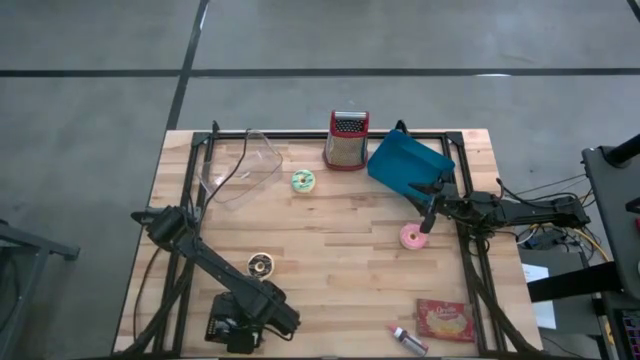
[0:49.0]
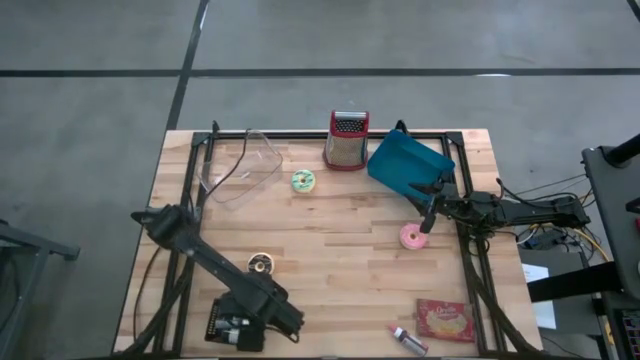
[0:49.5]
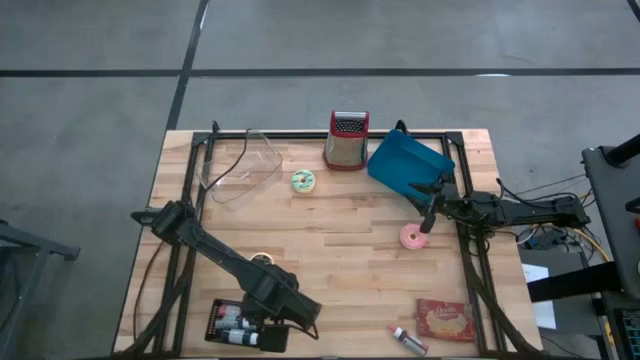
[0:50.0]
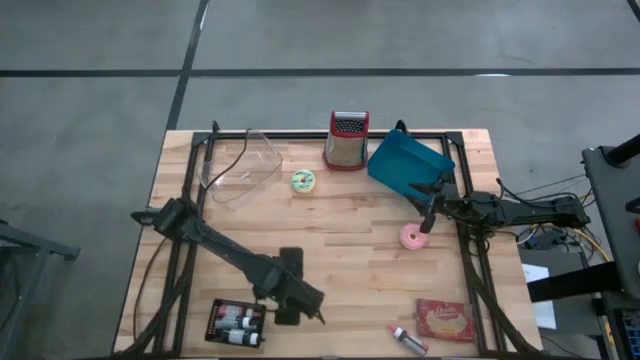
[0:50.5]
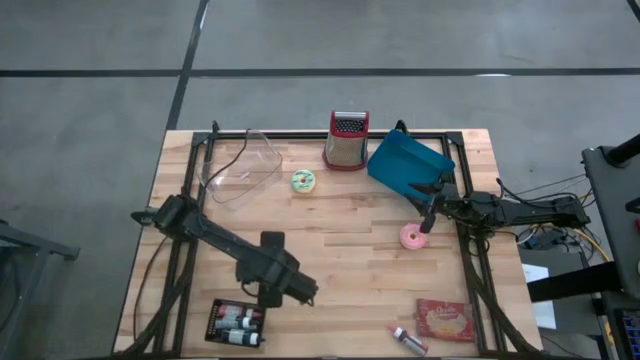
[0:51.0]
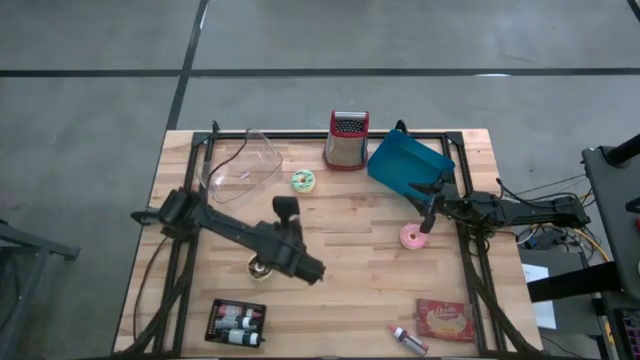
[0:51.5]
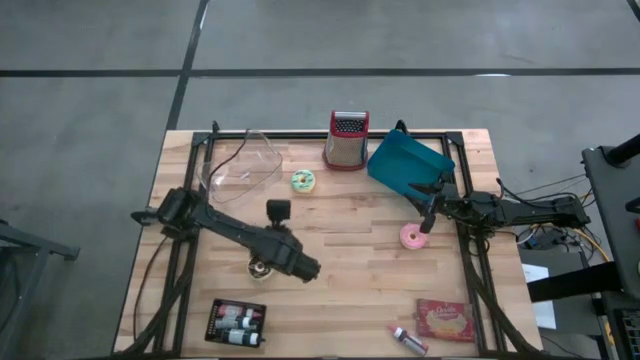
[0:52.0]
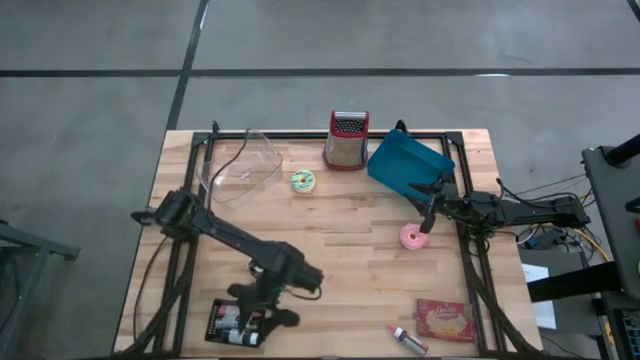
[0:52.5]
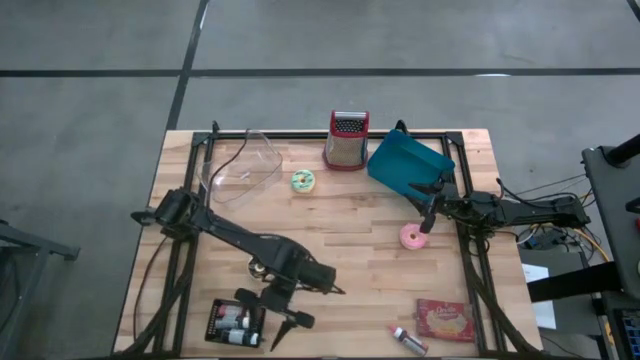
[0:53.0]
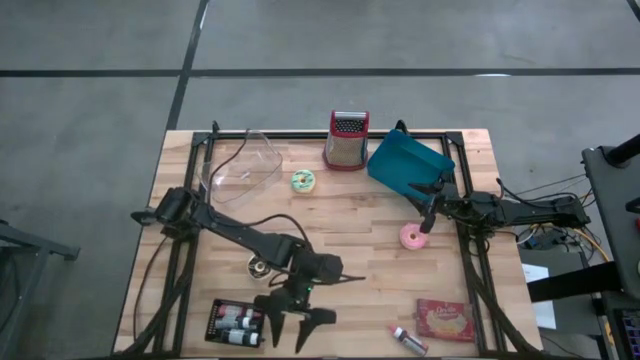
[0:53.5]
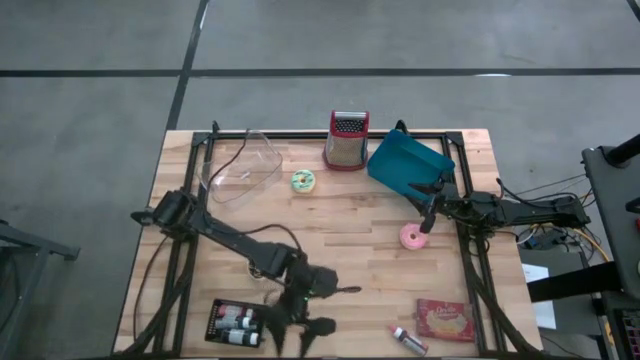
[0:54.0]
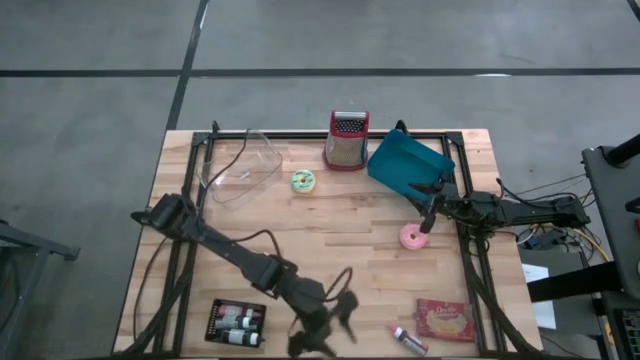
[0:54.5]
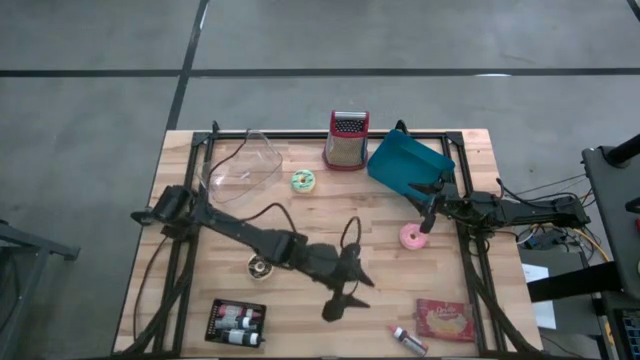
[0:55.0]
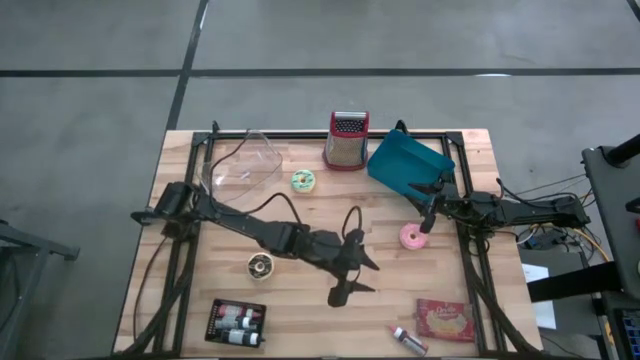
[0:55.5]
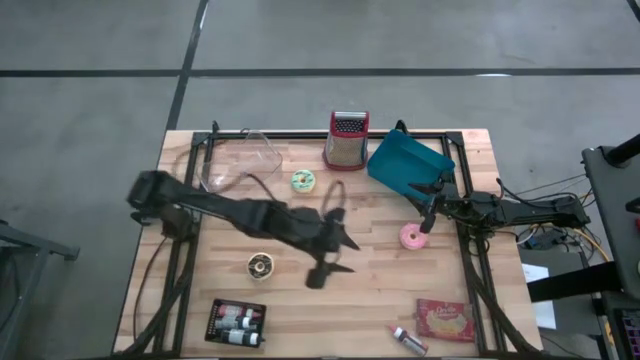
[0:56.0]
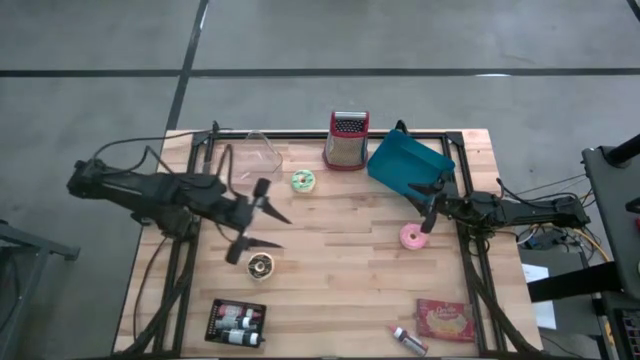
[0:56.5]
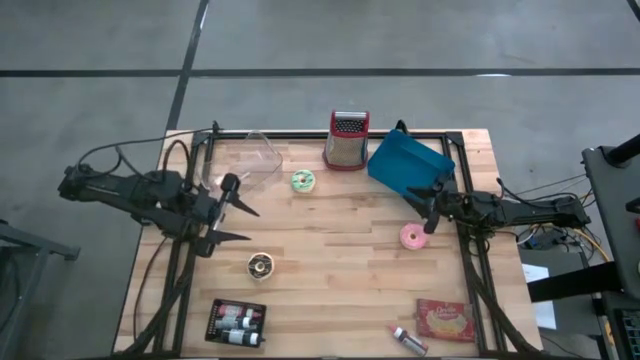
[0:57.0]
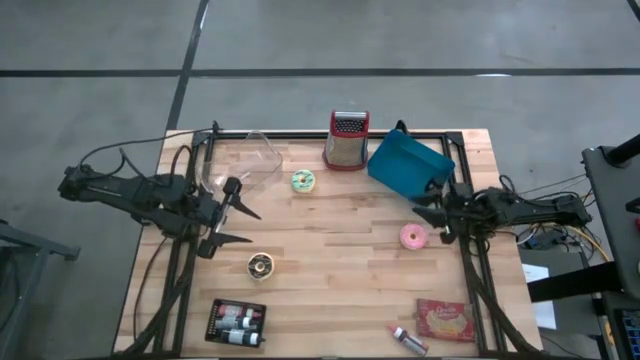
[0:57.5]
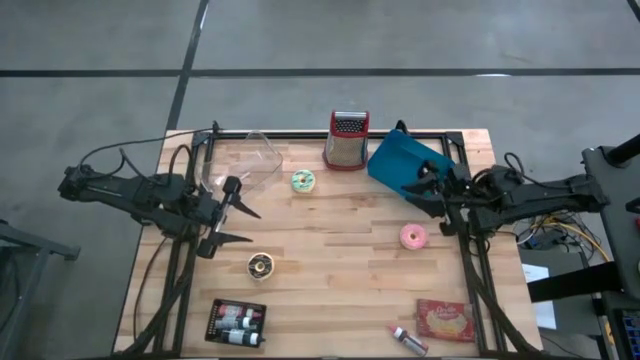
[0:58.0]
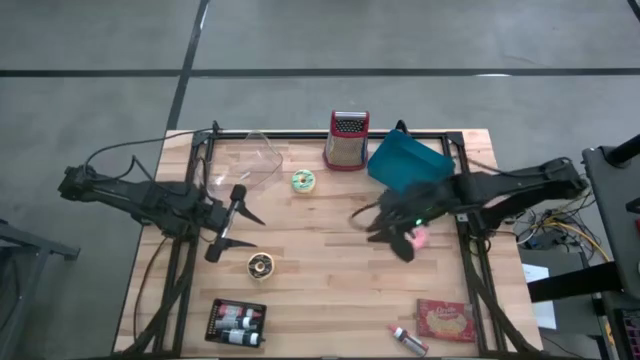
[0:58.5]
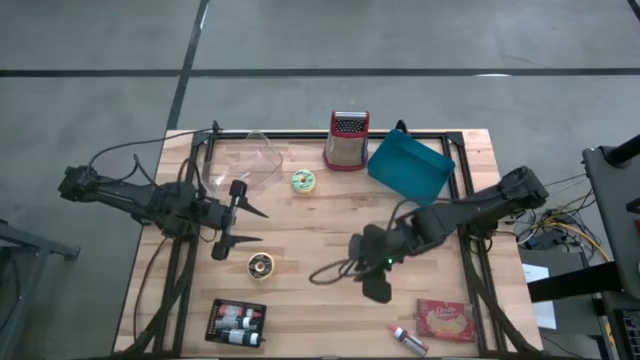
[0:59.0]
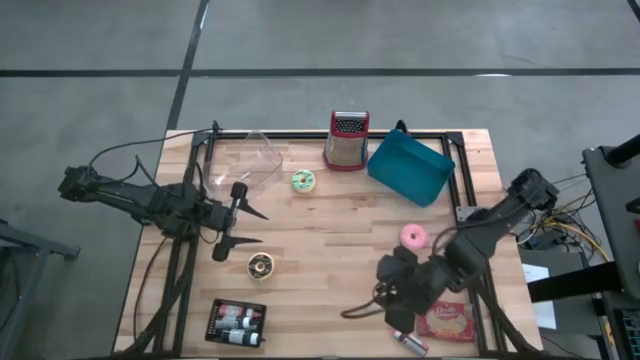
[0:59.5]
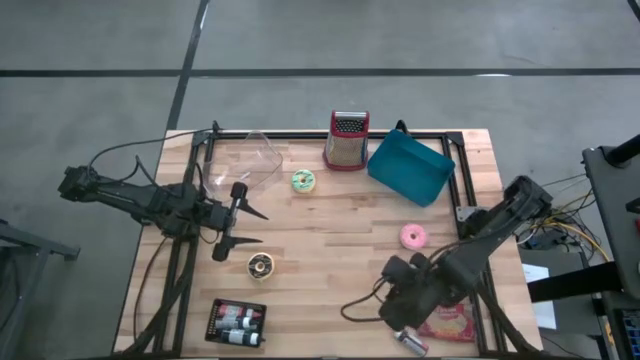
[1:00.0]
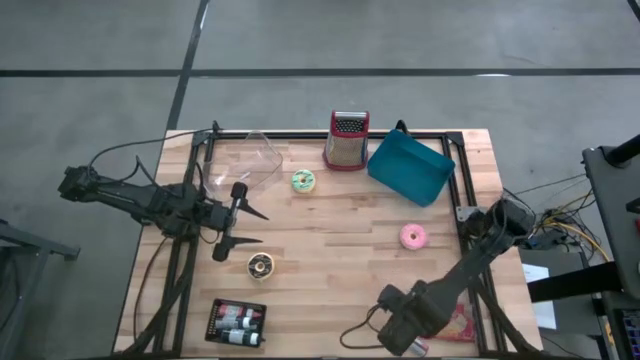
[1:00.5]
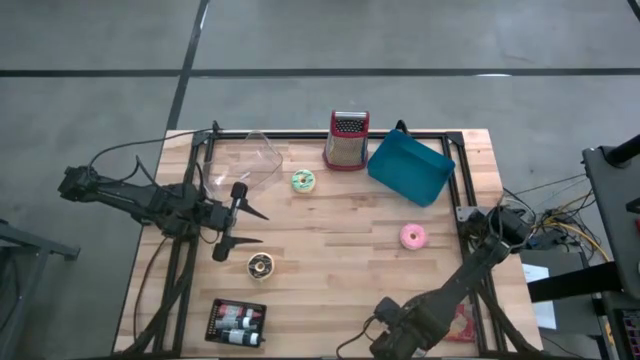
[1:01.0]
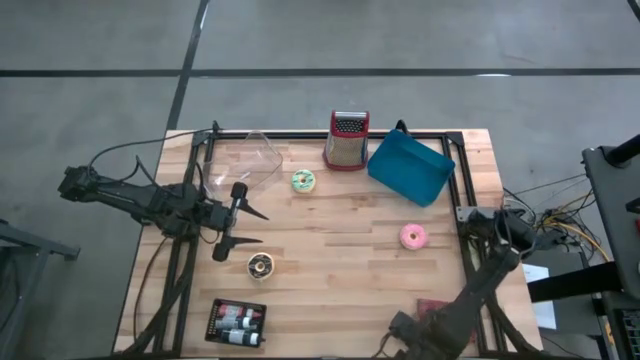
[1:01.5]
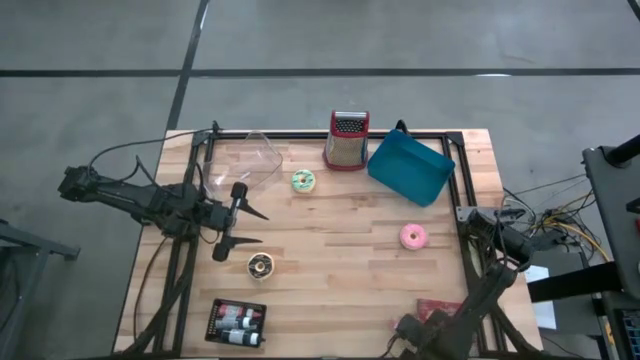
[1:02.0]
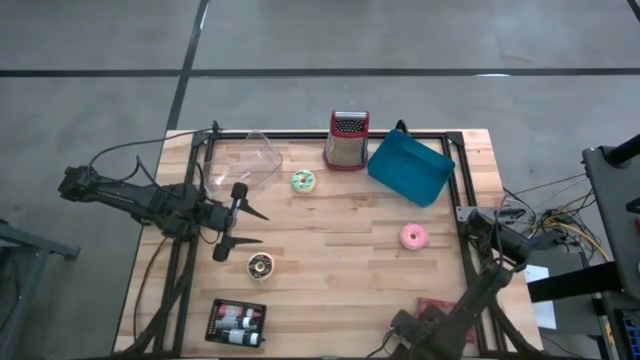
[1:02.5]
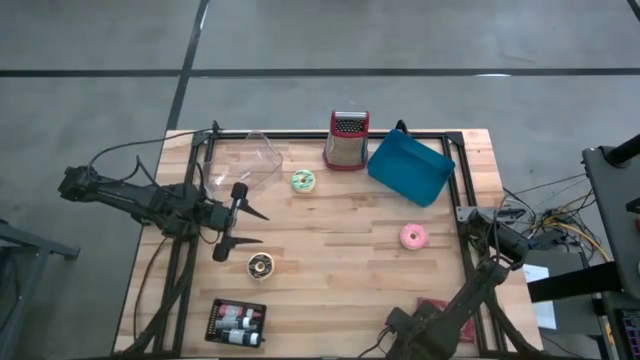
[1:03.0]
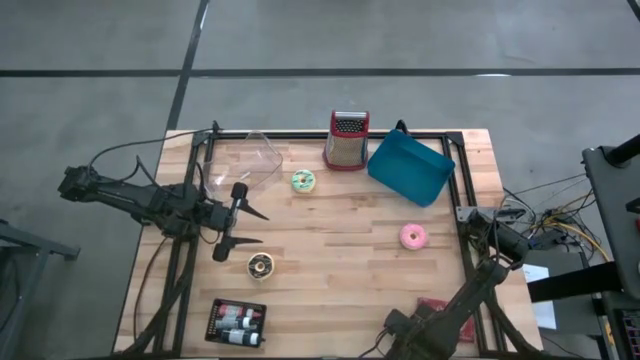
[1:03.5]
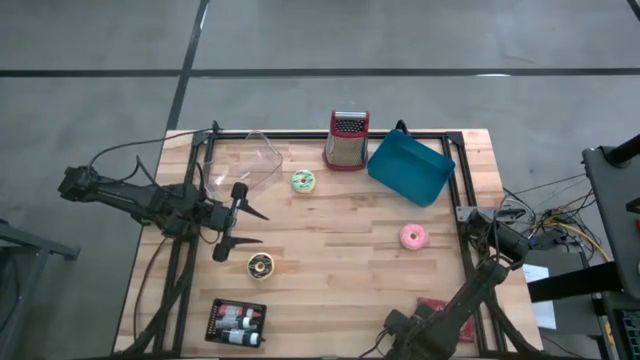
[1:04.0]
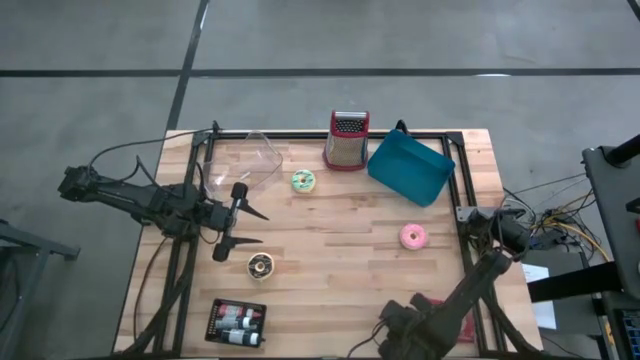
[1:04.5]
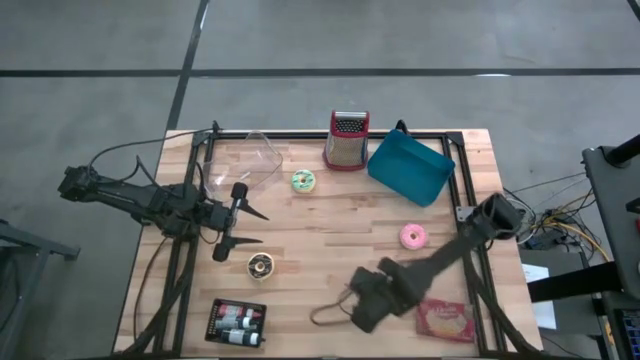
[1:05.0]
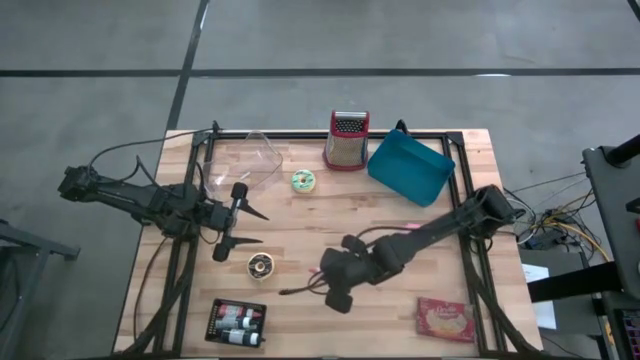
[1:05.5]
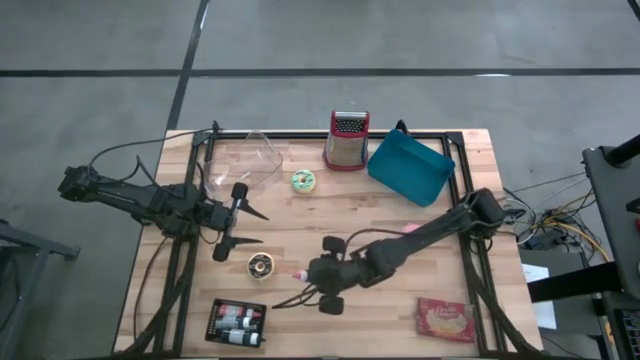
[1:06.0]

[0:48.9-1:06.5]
Task: Pick & Place Food Item
Put the pink food coloring bottle into the black bin

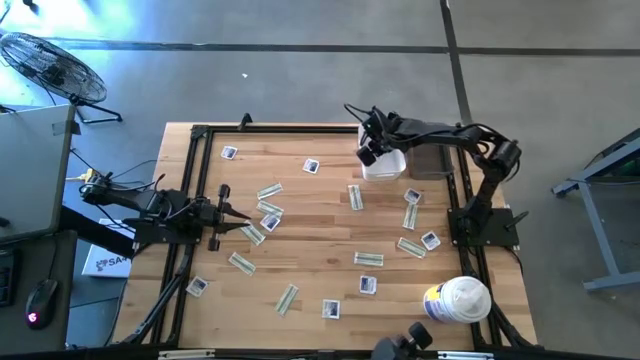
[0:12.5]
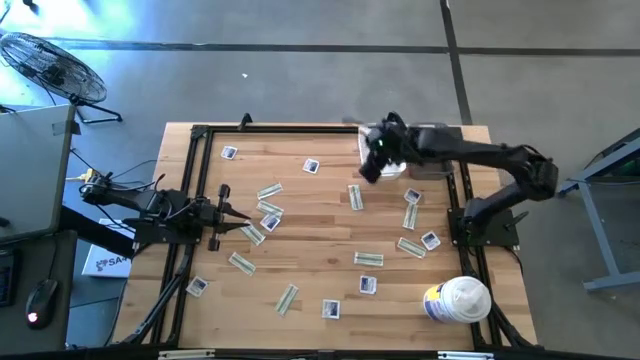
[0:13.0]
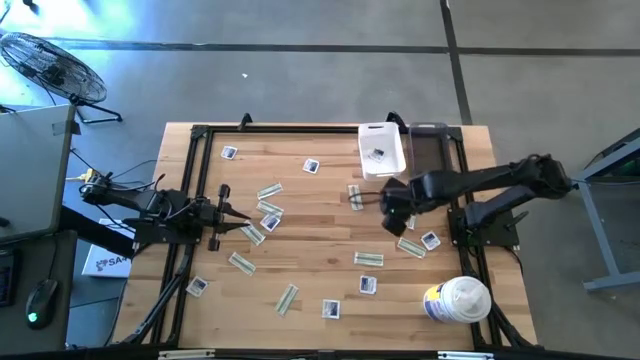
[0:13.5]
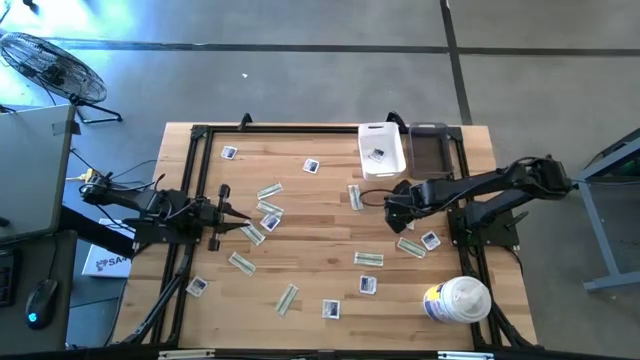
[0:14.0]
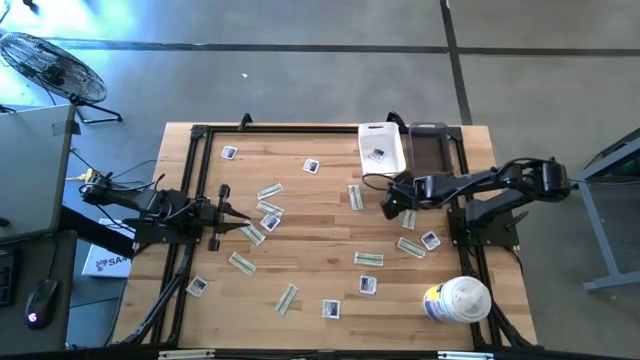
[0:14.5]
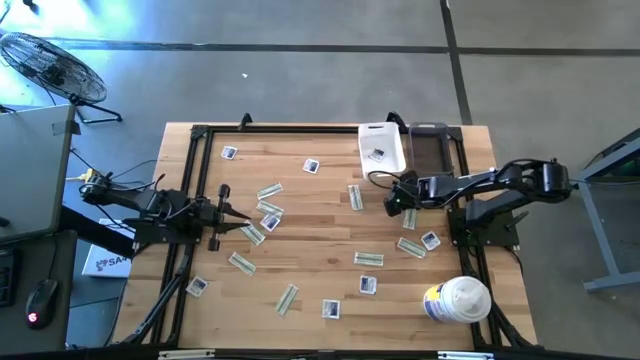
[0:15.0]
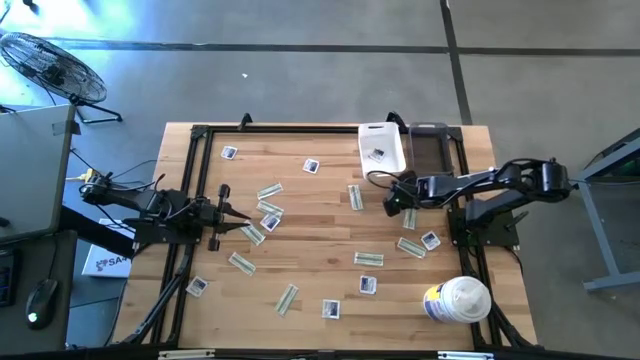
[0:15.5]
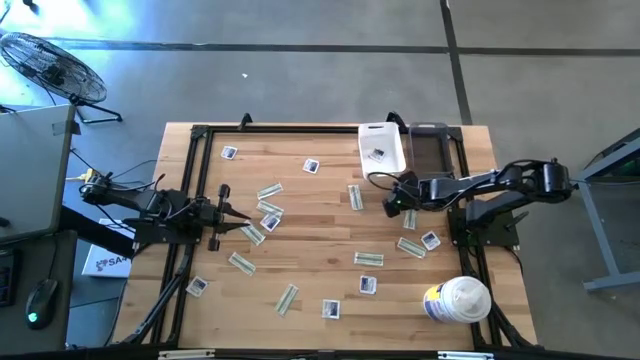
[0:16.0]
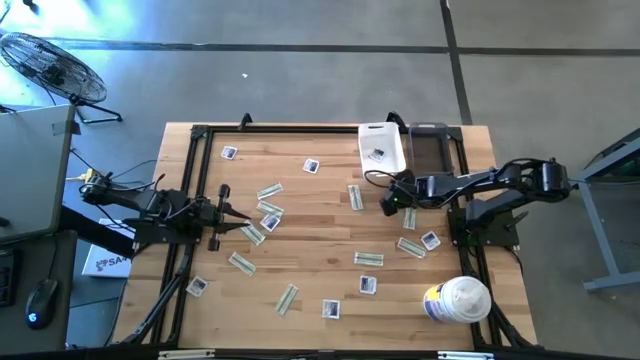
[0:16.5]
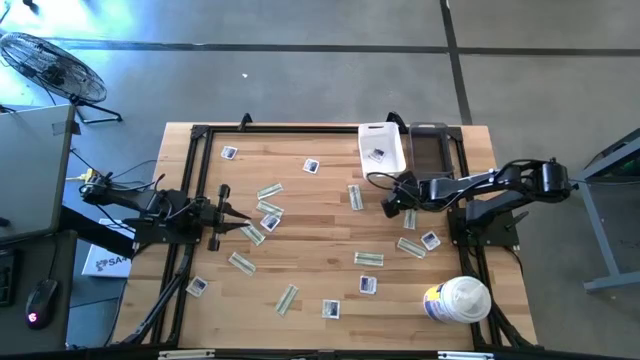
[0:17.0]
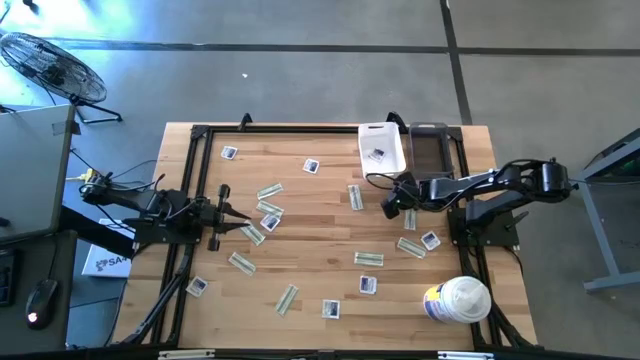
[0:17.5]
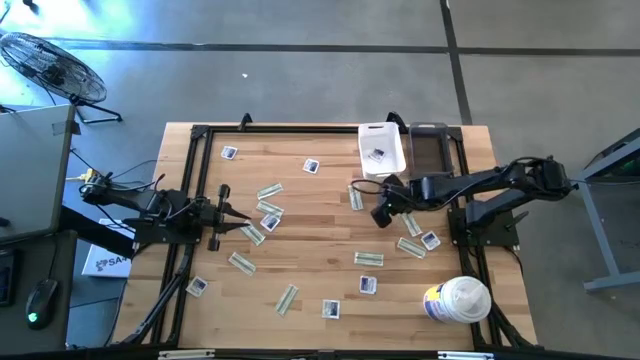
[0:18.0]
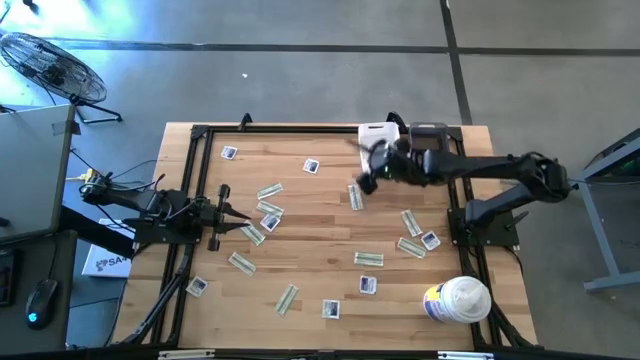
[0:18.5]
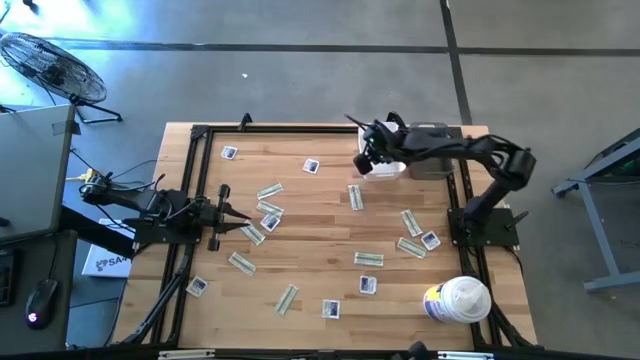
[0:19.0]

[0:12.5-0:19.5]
Task: Pick & Place First Aid Supplies
Put the alcohol pad into the white bin
